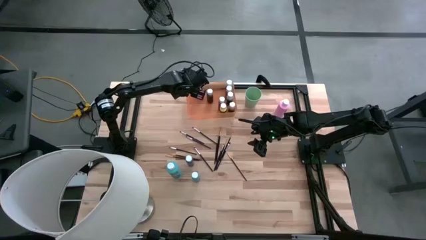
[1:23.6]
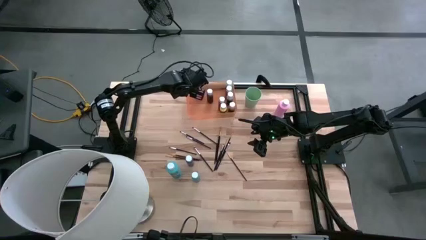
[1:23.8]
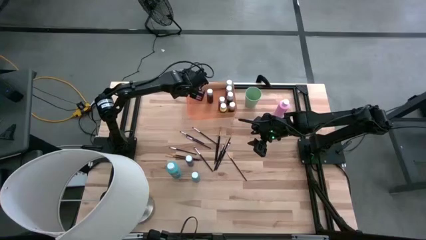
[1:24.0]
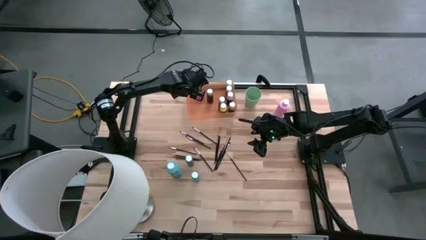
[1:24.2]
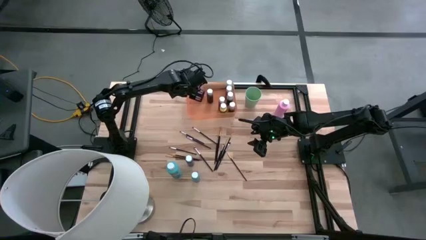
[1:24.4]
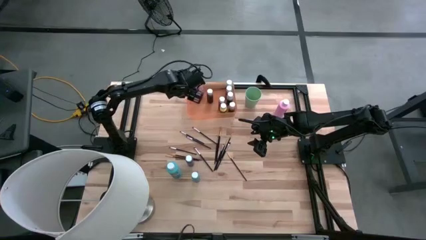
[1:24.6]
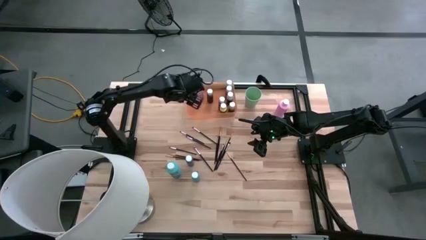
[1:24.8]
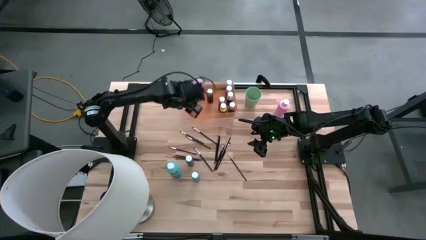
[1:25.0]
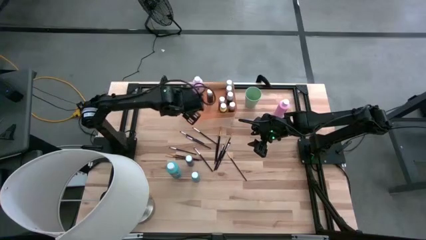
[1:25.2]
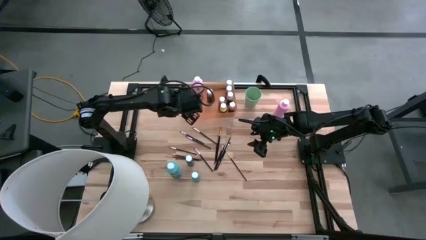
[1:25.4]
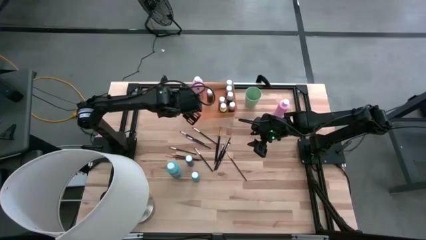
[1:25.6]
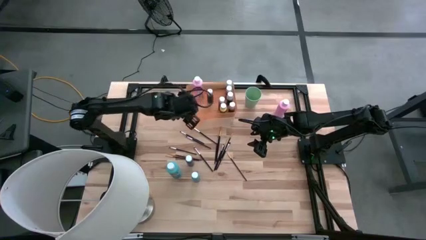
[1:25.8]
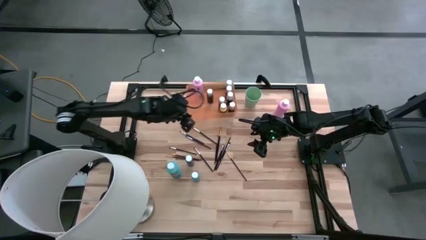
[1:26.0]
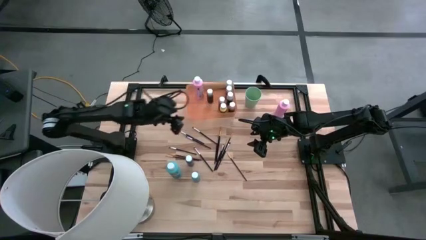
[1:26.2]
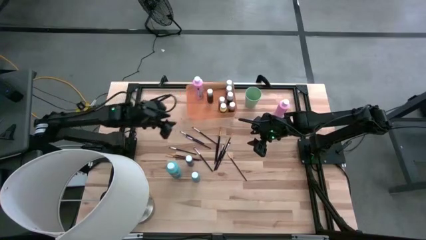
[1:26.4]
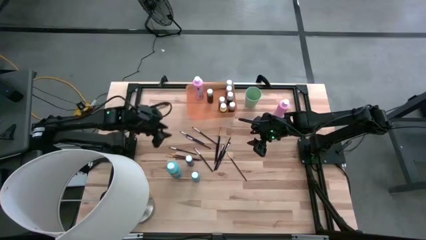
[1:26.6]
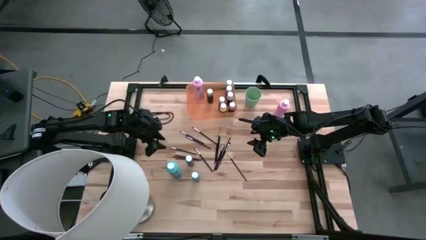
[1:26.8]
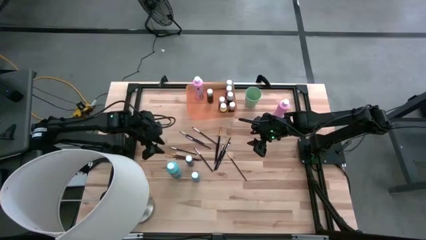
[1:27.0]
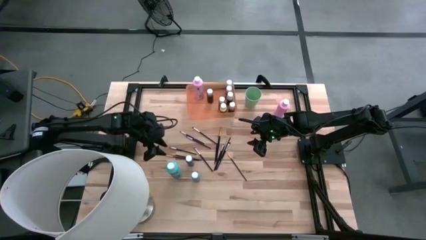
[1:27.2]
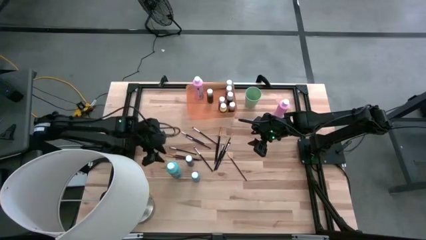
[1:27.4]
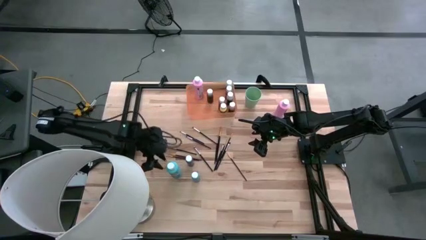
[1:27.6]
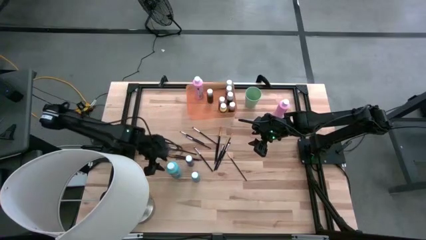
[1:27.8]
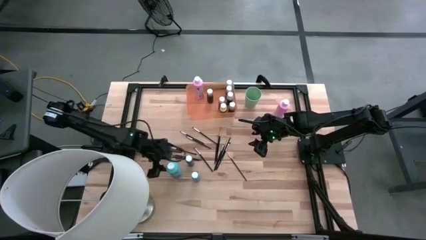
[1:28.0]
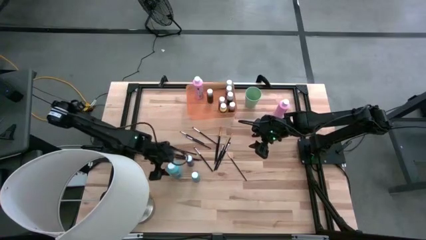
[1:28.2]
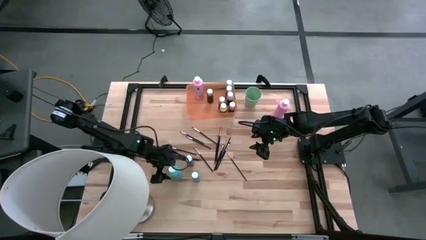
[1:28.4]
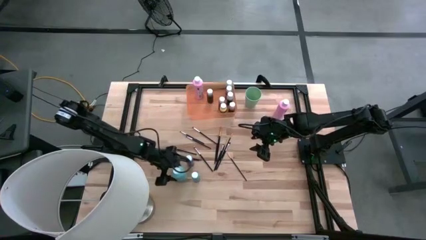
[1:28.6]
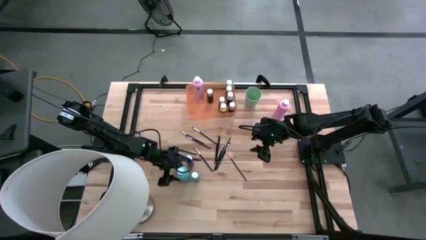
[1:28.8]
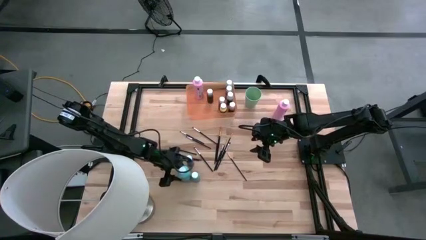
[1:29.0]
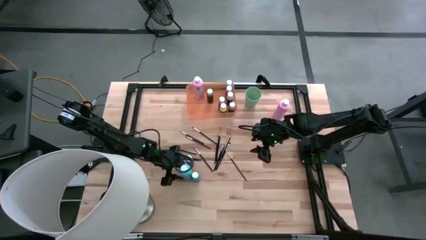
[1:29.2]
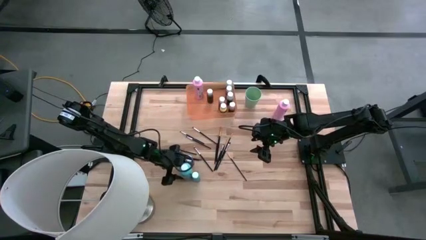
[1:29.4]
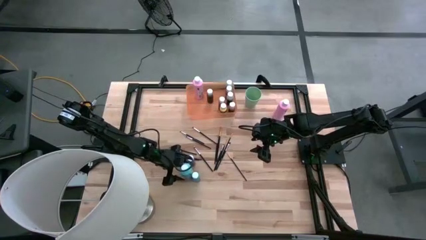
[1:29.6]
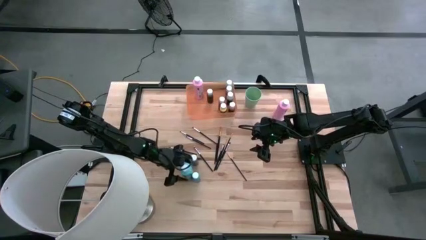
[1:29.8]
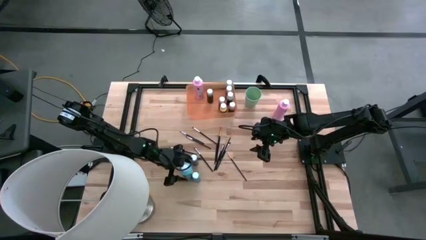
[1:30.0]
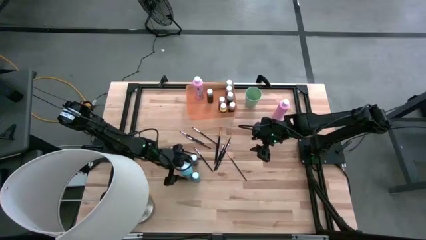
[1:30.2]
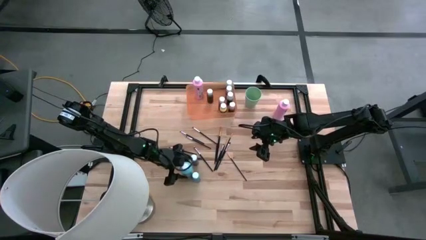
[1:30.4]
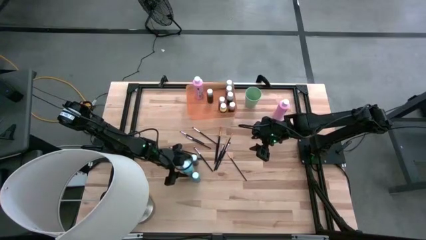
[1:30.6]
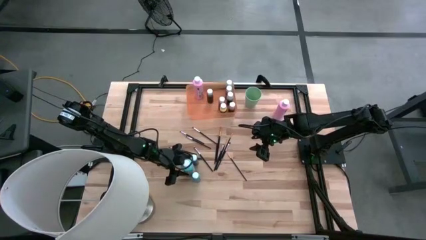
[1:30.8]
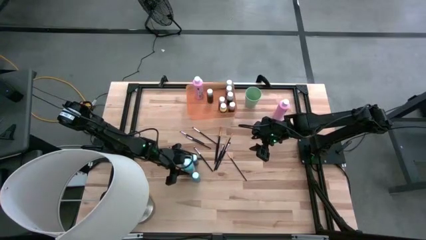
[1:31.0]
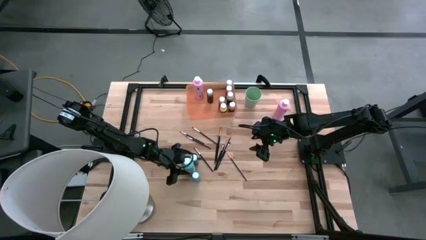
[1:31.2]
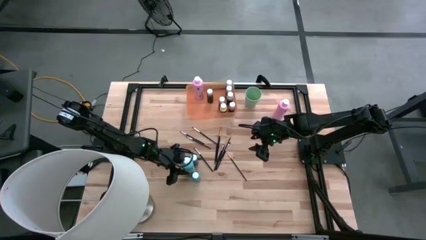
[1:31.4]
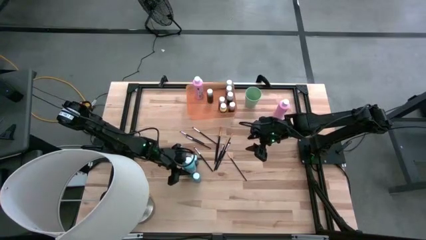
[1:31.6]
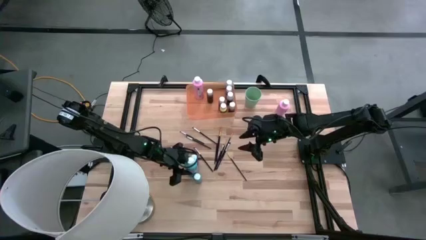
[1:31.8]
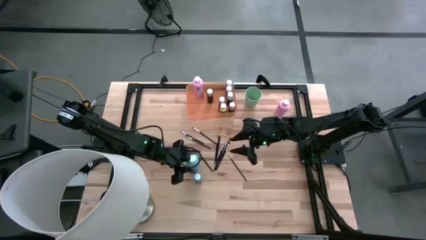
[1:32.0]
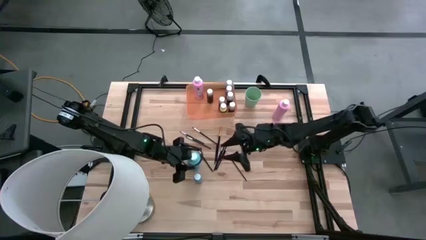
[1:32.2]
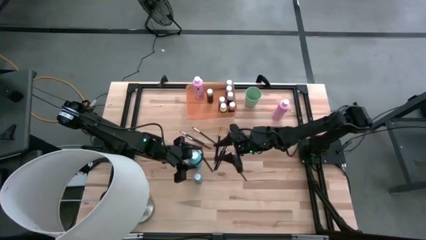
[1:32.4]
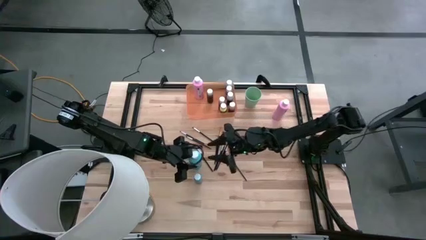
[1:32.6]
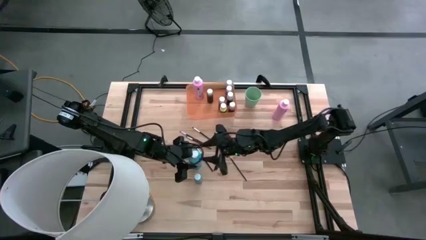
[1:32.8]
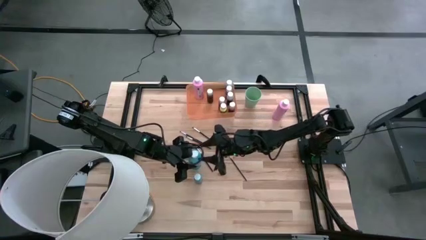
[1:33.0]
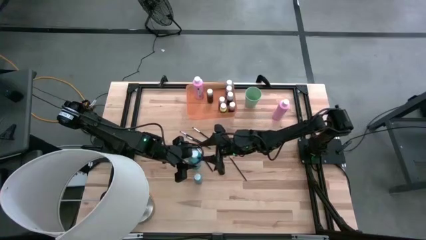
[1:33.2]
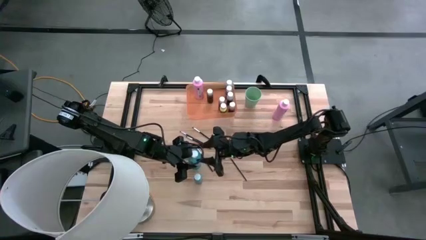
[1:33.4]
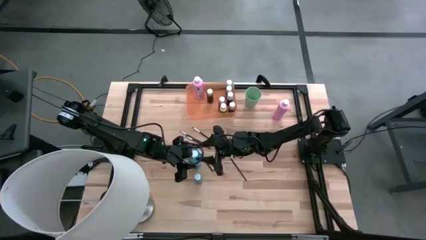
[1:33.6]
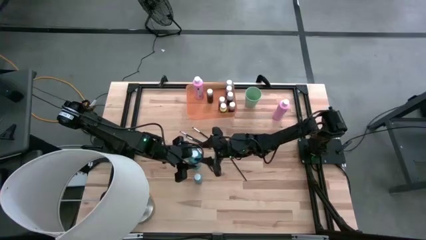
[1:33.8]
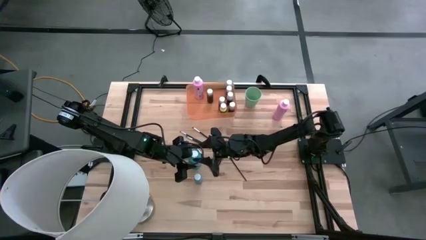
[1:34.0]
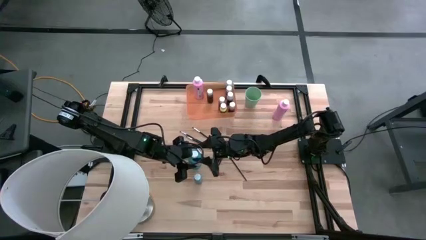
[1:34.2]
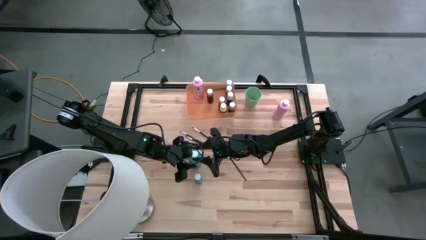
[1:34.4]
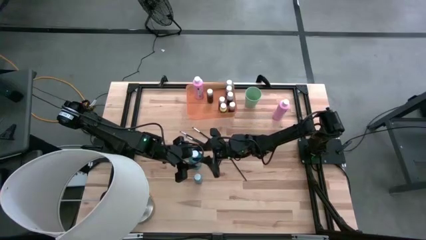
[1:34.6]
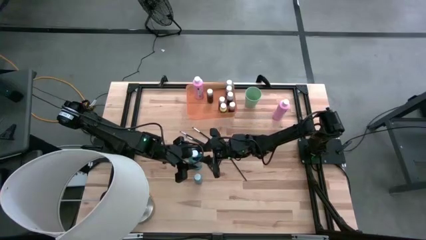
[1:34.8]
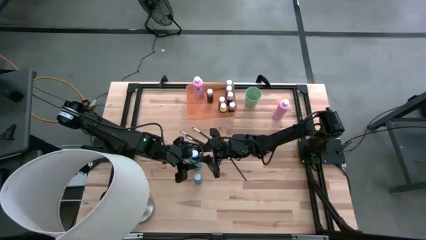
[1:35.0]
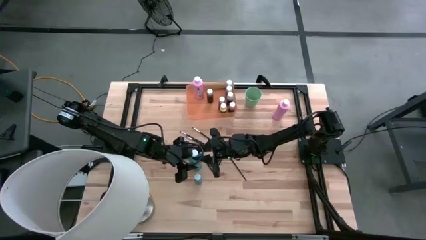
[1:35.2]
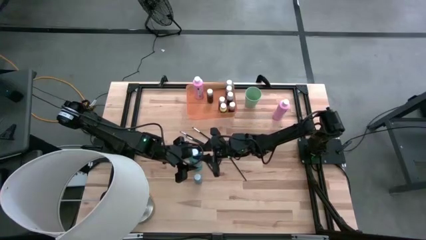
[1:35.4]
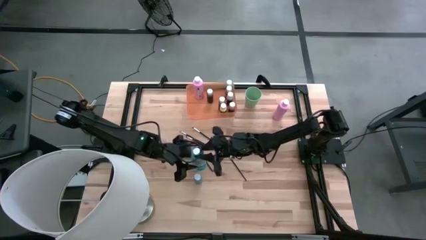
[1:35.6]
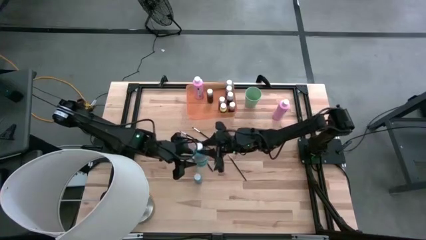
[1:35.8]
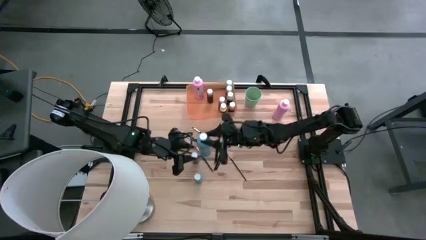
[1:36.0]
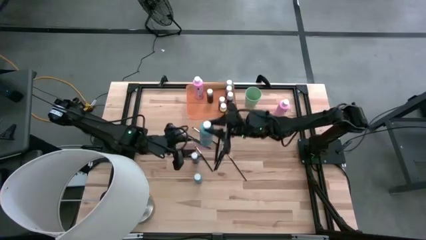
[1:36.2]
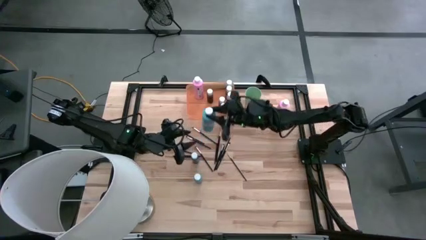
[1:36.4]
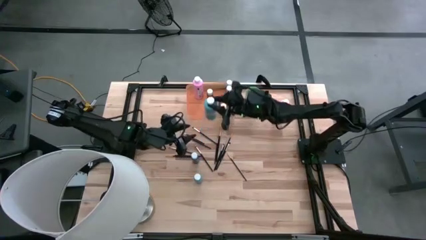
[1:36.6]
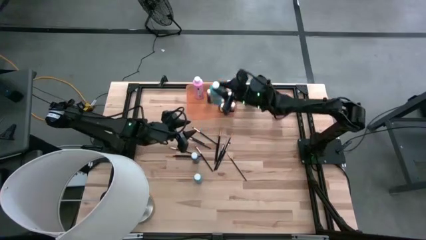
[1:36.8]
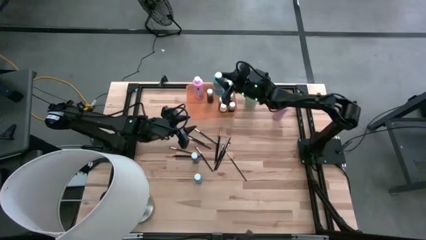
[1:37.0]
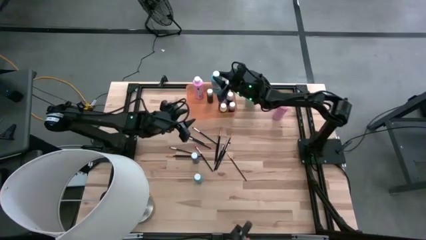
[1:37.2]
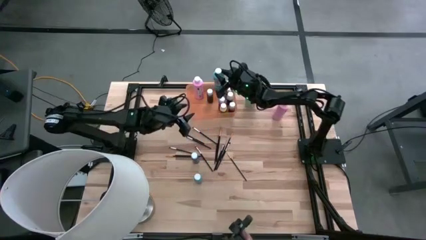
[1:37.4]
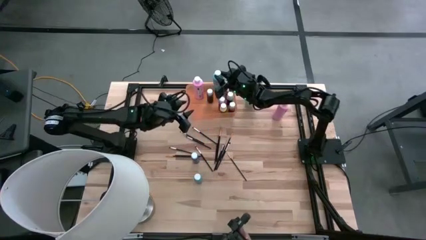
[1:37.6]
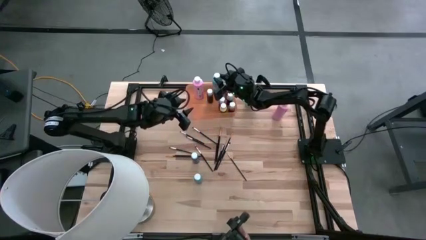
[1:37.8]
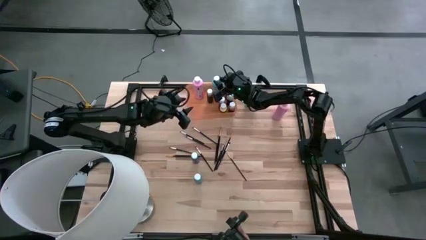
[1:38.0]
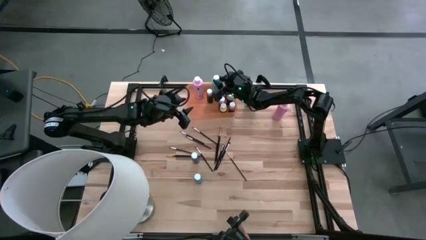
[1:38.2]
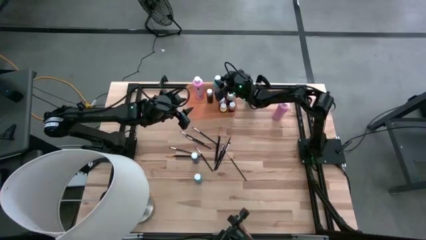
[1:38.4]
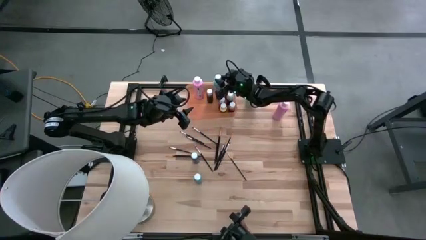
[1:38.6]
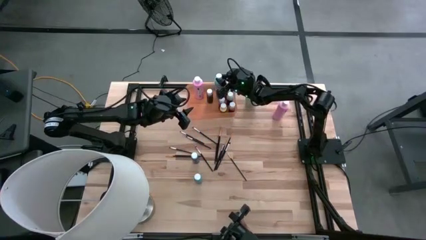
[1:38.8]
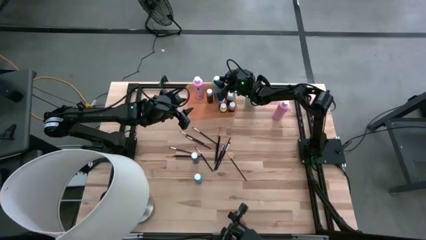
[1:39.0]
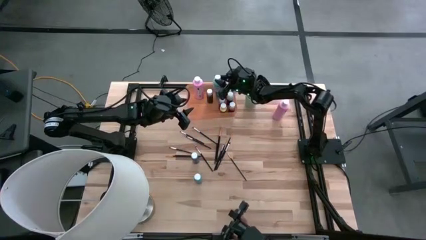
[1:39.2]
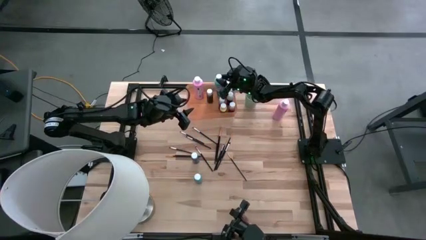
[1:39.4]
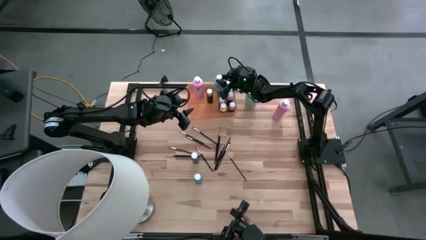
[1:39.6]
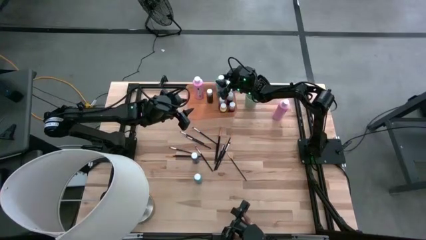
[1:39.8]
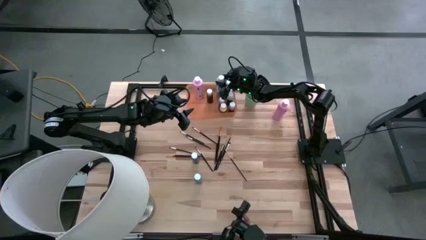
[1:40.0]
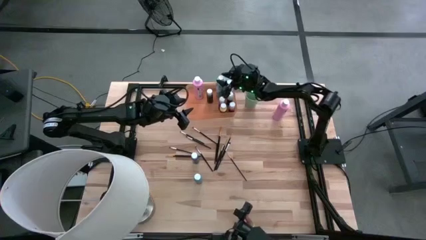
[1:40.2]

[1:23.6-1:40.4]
Task: Pick & Place Paint Supplies
Put the large blue paint bottle into the orange bin
